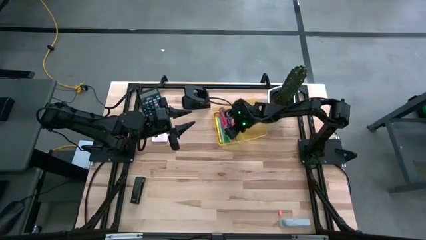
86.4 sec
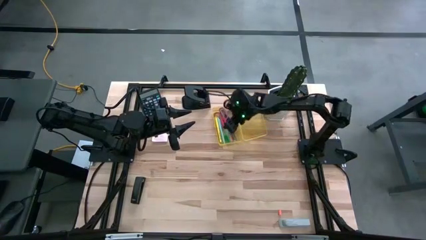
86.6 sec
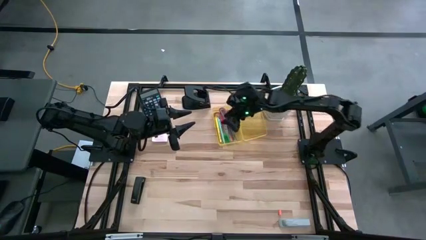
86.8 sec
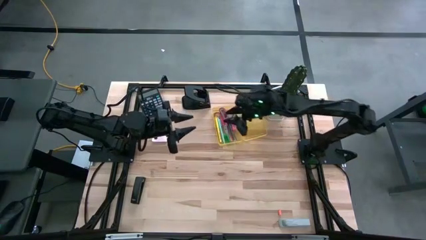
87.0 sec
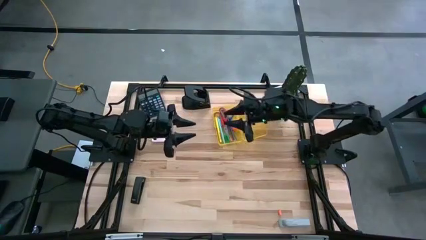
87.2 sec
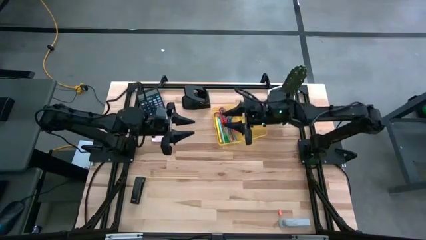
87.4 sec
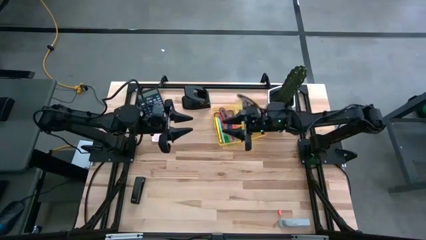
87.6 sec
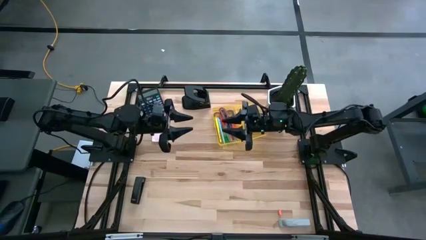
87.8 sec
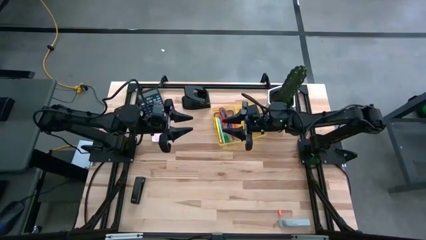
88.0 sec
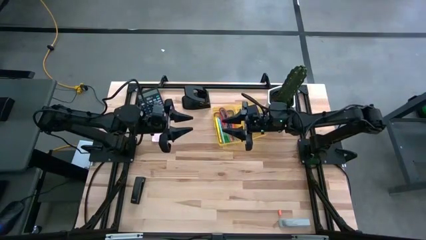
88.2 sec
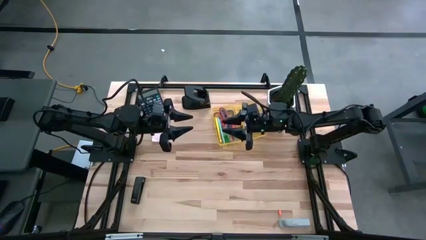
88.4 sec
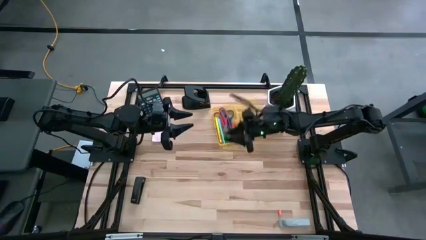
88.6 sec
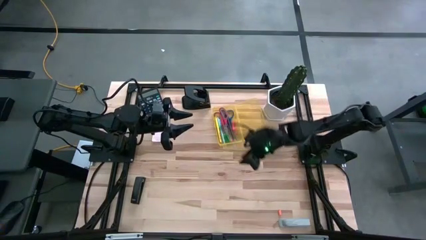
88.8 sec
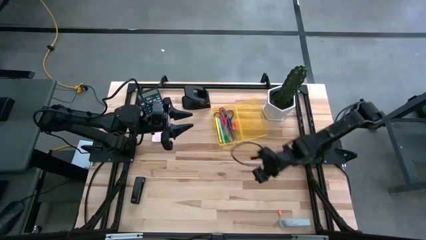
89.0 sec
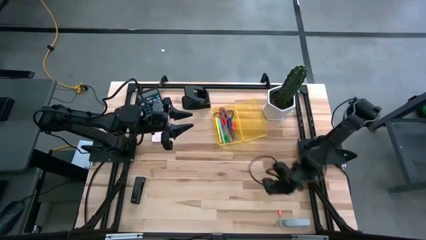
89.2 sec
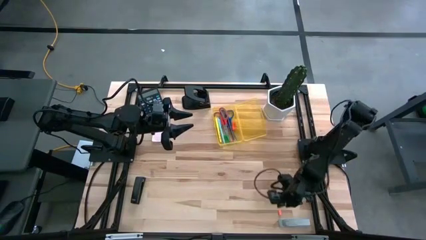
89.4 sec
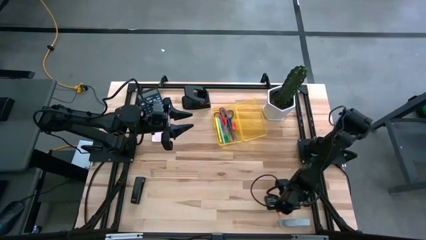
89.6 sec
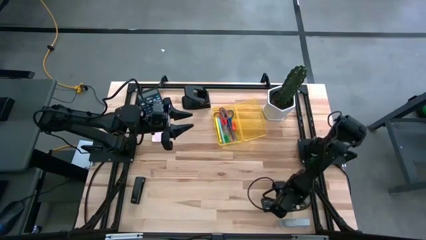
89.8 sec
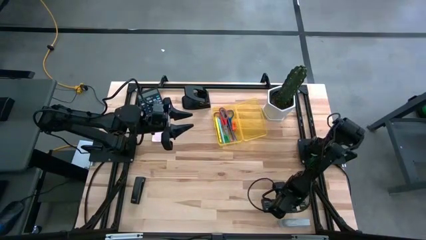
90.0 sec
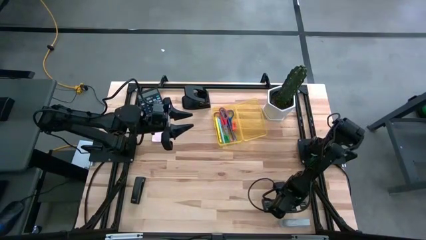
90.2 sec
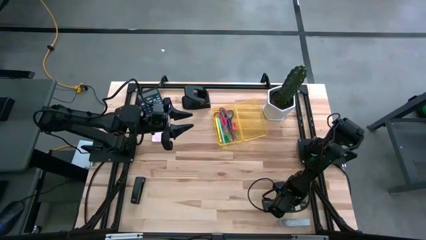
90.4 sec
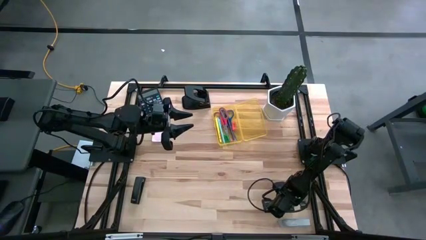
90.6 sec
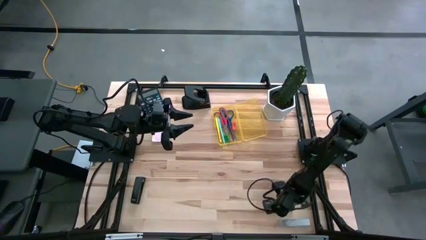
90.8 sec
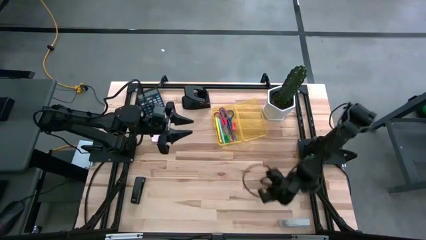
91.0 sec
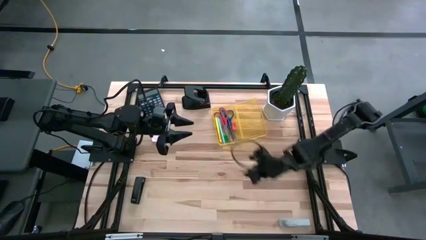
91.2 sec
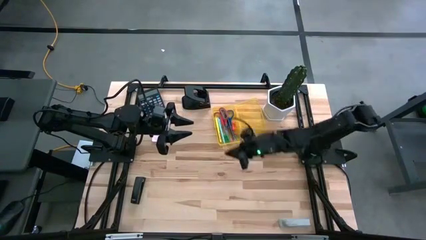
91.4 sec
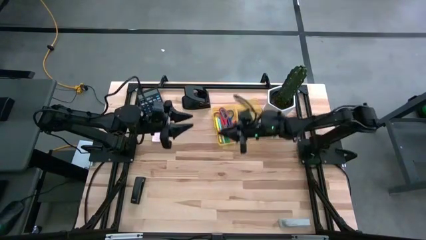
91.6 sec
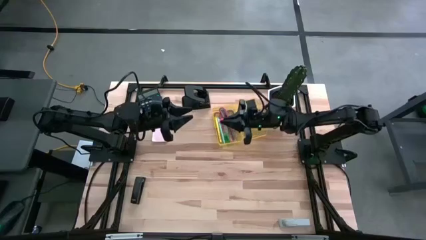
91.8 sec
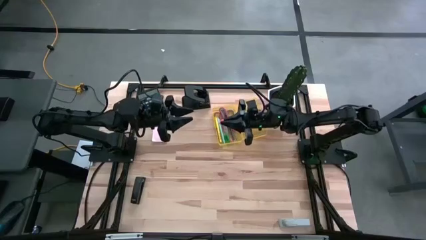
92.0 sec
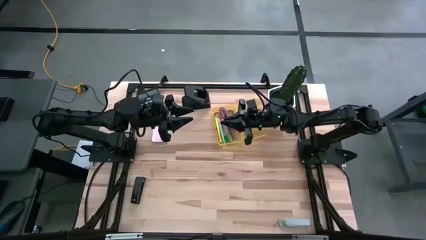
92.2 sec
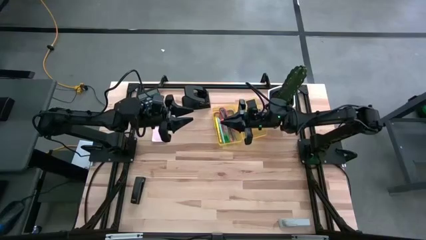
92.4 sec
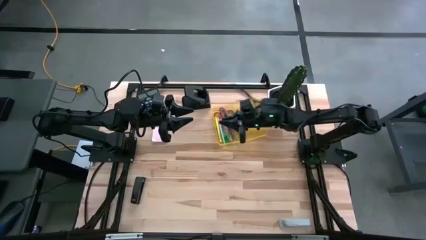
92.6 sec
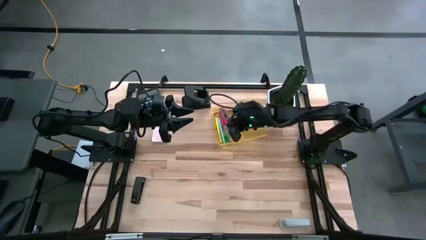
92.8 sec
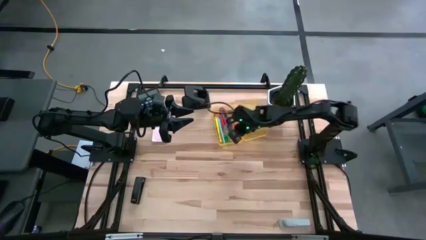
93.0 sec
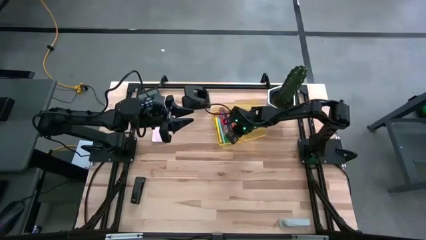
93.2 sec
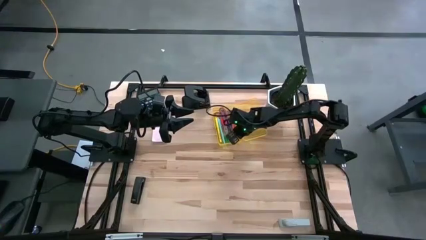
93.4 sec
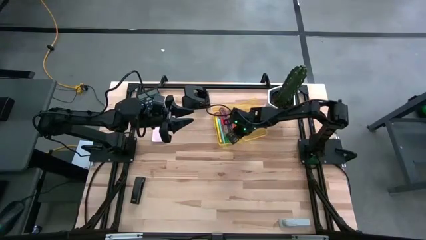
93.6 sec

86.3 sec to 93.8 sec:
Task: Pack school essentials
Put the orange small eraser into the yellow supply box

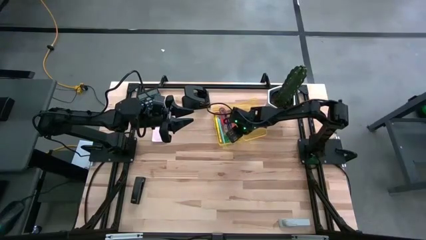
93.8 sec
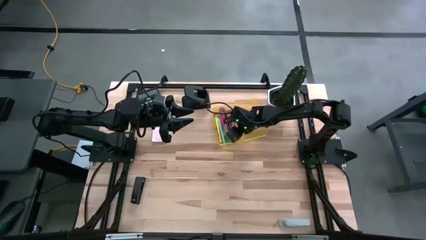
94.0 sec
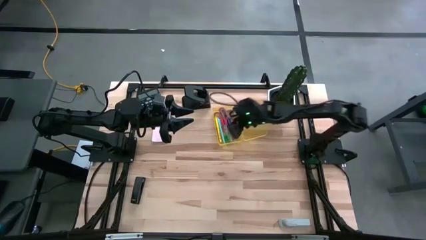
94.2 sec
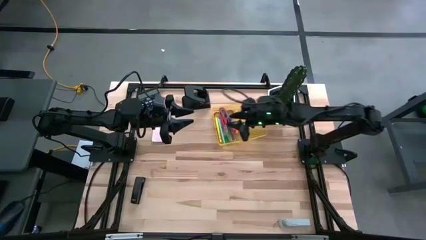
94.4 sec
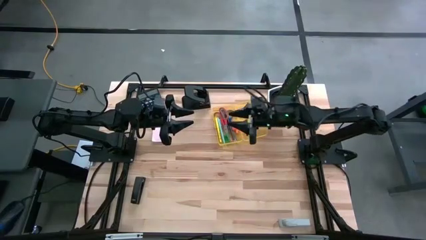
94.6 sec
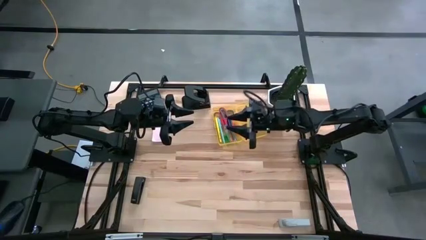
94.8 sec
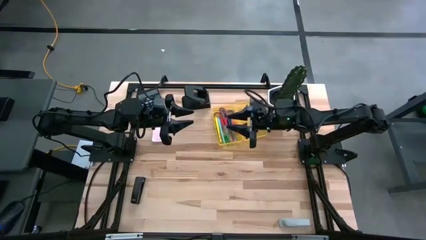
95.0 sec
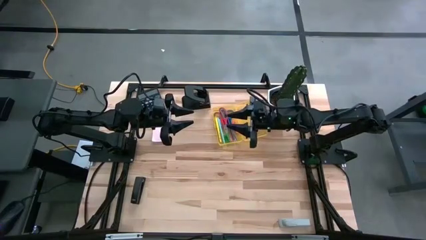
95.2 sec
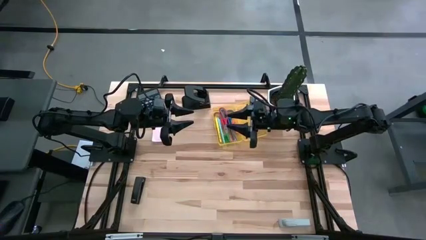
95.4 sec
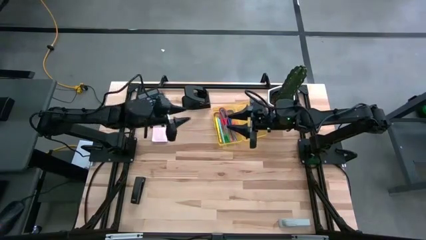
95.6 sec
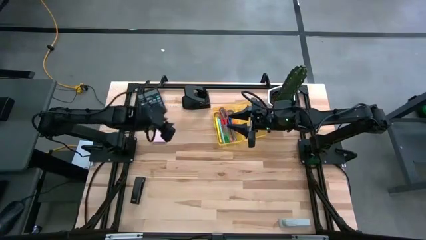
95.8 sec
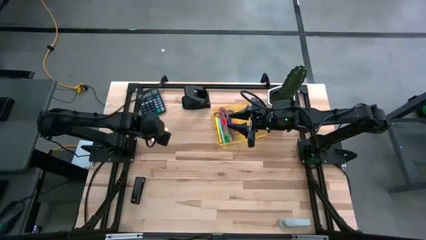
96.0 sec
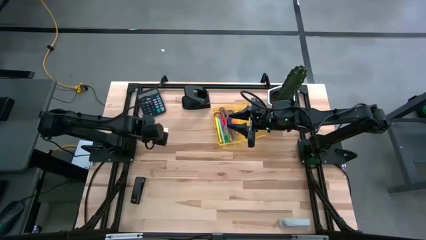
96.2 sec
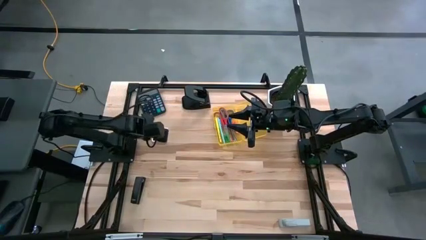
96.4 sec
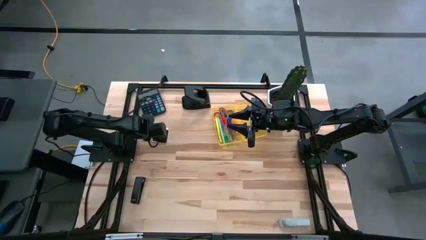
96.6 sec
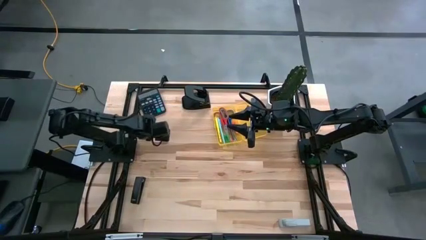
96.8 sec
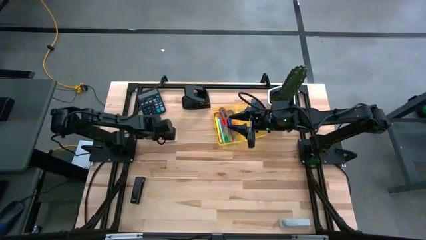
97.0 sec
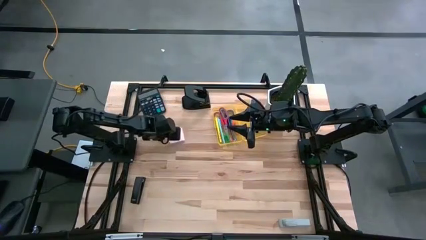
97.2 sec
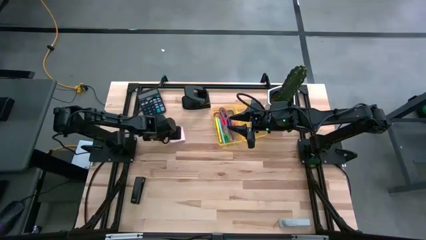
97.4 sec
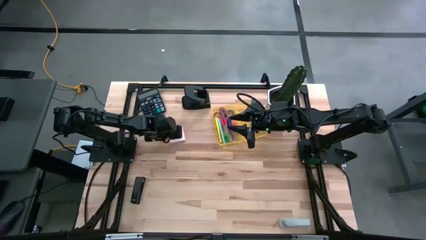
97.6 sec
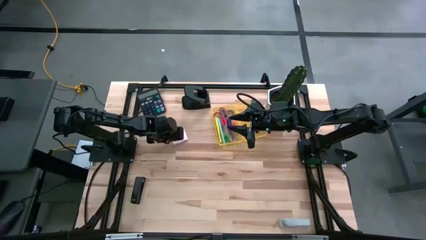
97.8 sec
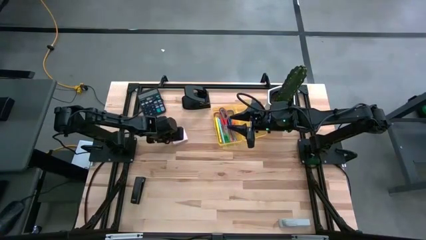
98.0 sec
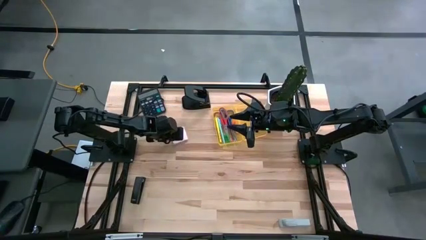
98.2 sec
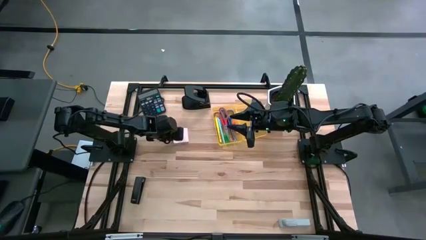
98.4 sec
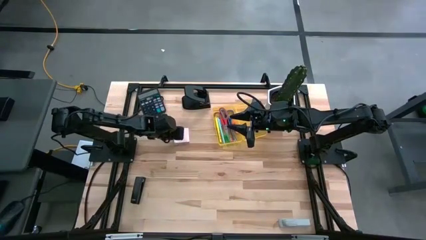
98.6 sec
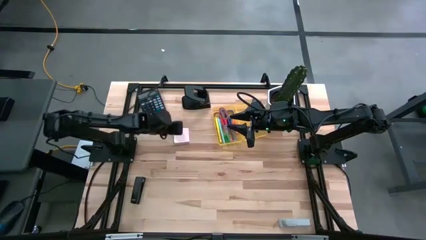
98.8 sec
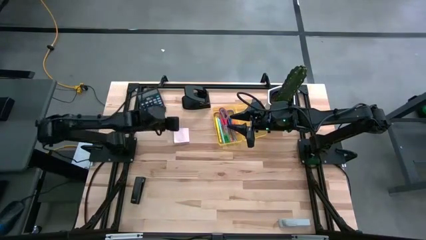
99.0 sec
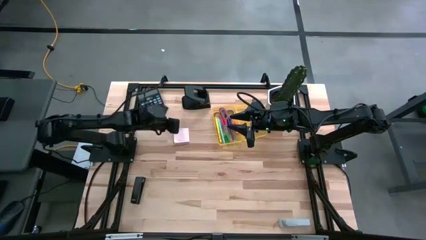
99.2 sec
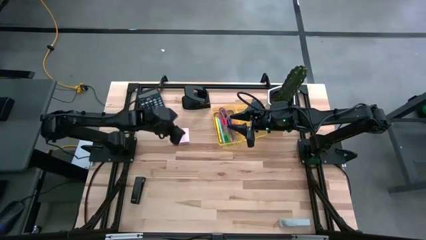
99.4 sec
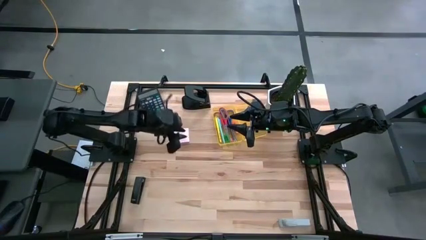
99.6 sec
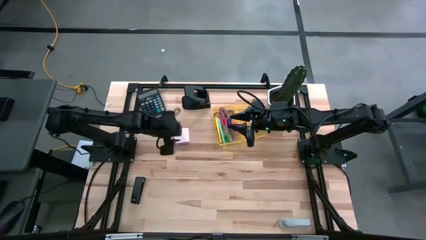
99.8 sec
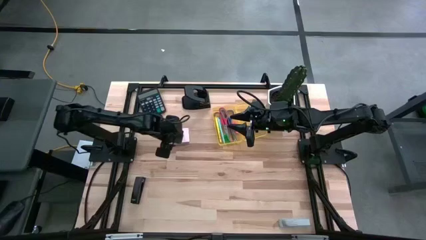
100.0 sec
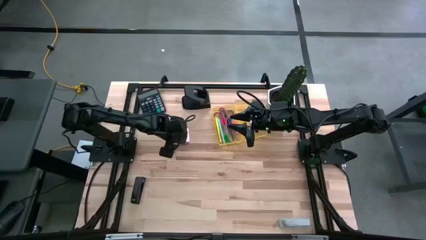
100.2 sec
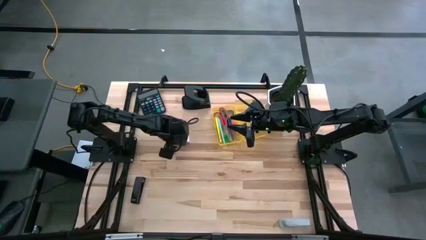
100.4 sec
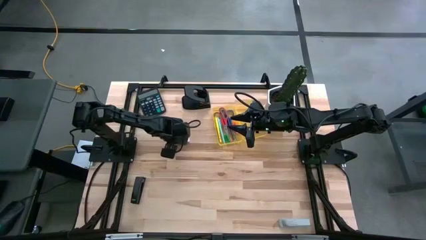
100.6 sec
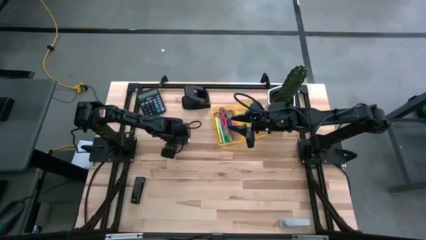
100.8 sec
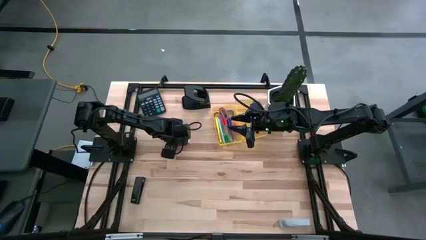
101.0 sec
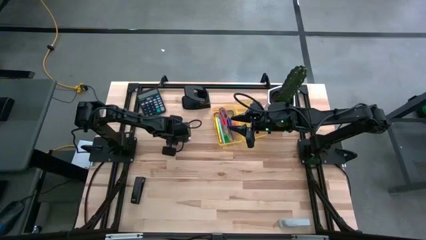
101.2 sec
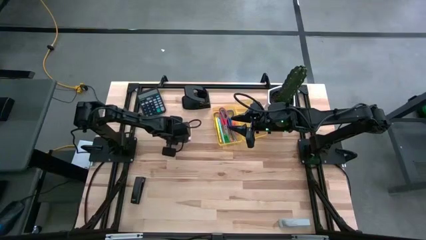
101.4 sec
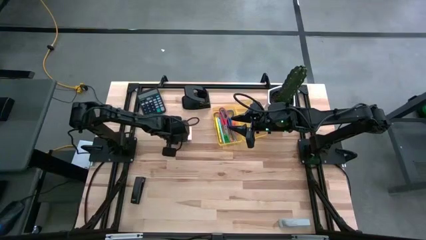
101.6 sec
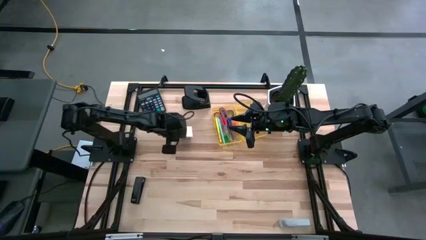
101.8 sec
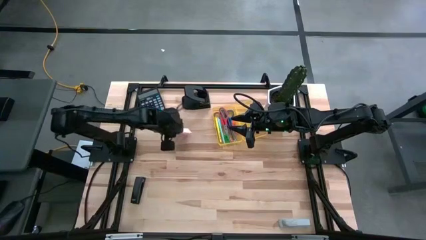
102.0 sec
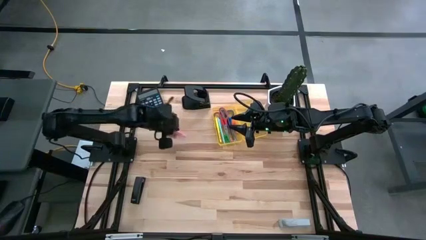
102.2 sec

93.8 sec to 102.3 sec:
Put the pink sticky notes into the yellow supply box
